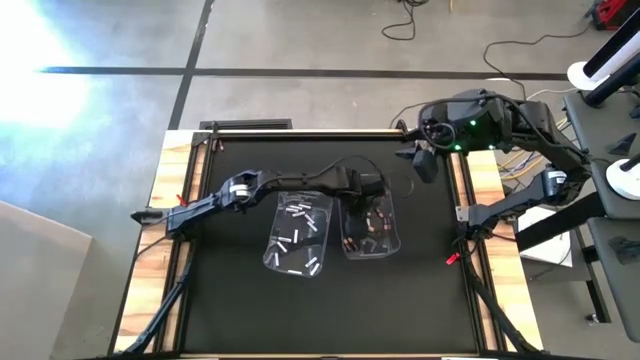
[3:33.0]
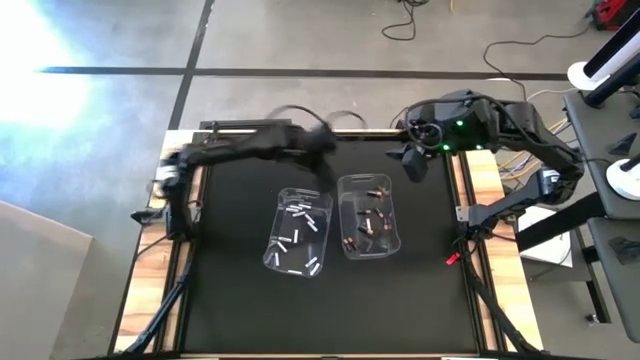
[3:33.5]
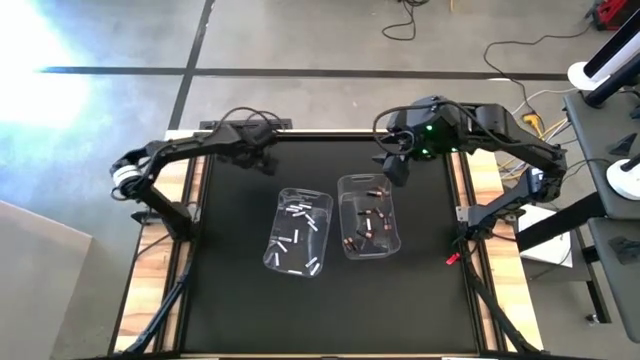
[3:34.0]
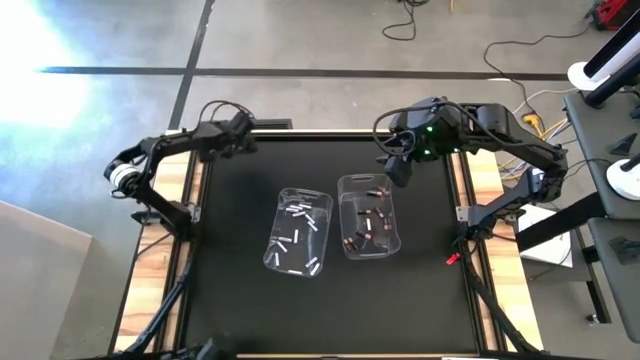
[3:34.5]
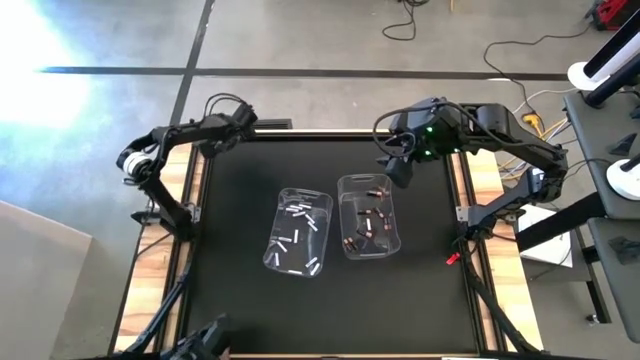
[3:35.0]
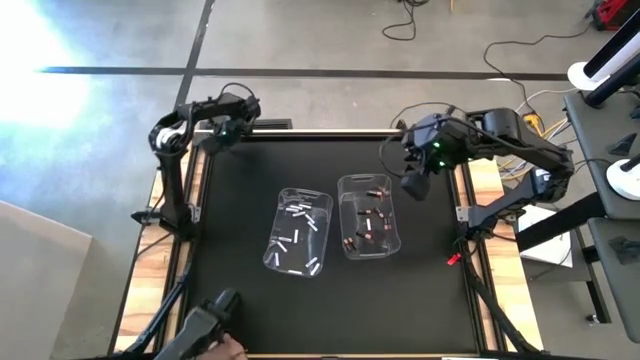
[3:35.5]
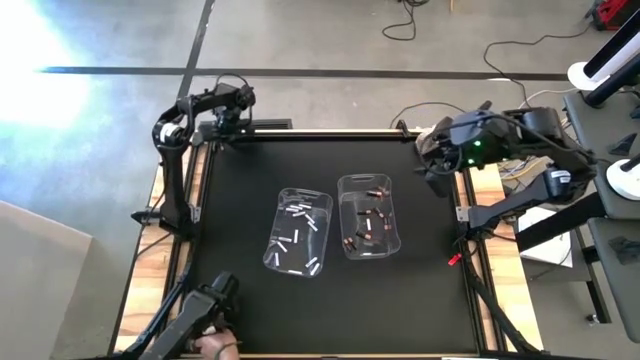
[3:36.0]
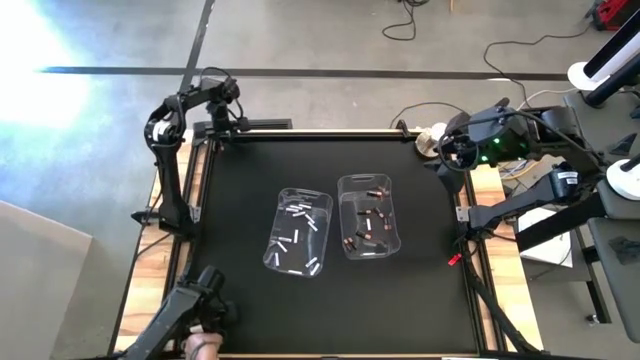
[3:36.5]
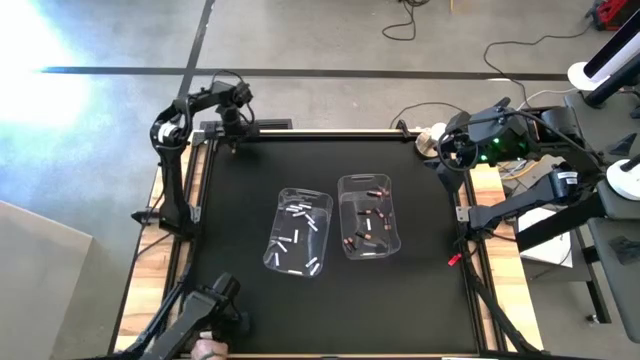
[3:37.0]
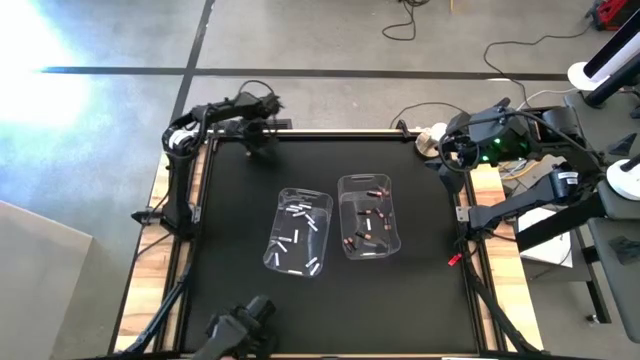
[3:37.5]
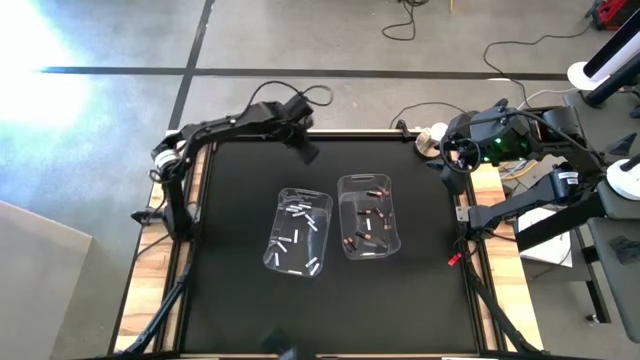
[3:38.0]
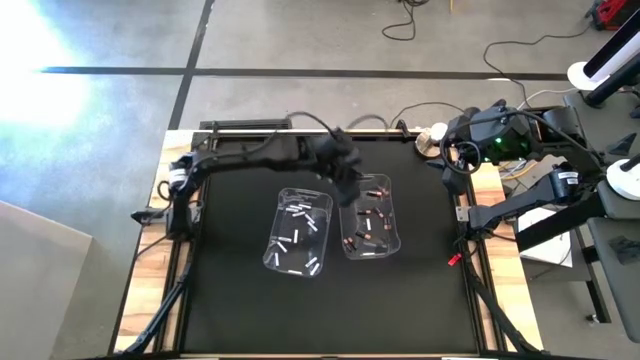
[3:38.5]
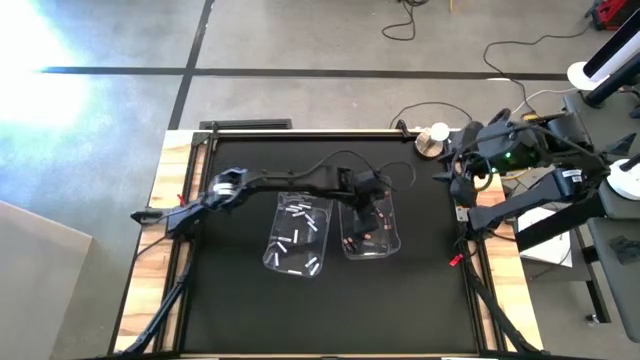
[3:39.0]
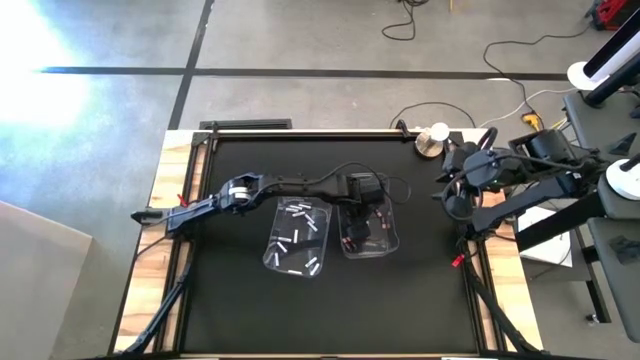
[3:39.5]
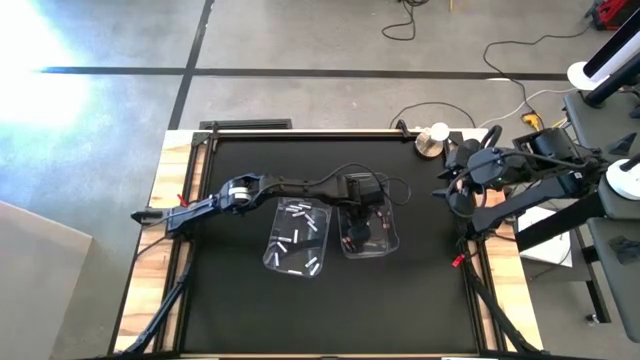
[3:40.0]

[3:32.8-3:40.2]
Task: Sort batteries
Put the black battery into the right transparent bin

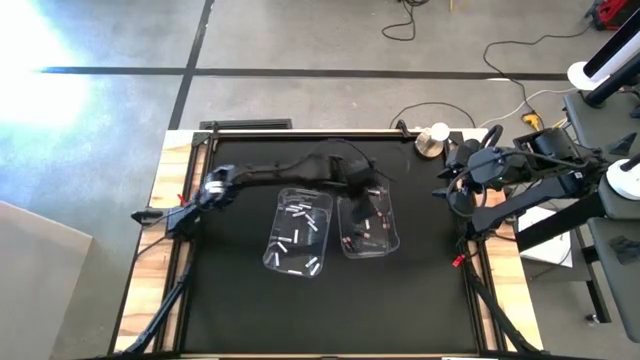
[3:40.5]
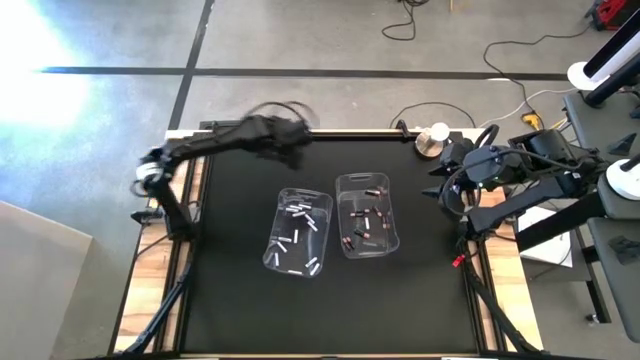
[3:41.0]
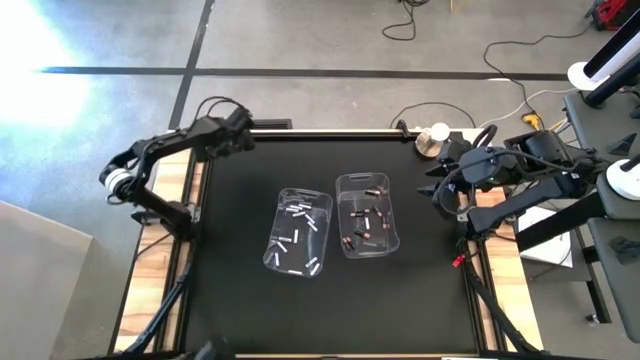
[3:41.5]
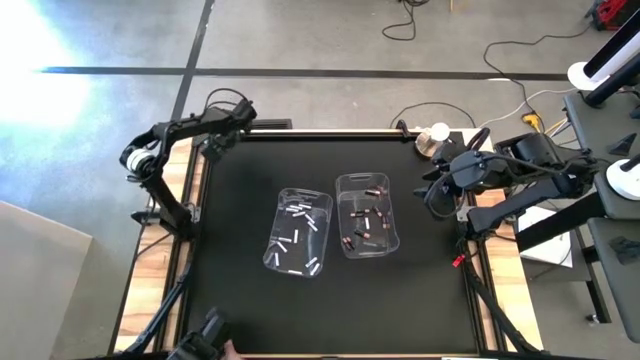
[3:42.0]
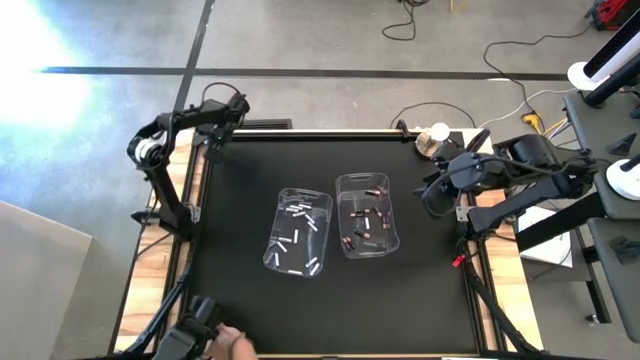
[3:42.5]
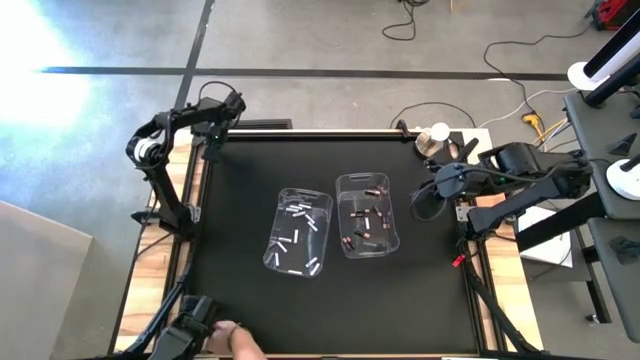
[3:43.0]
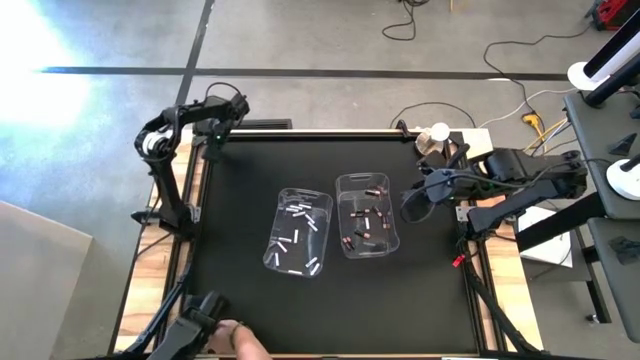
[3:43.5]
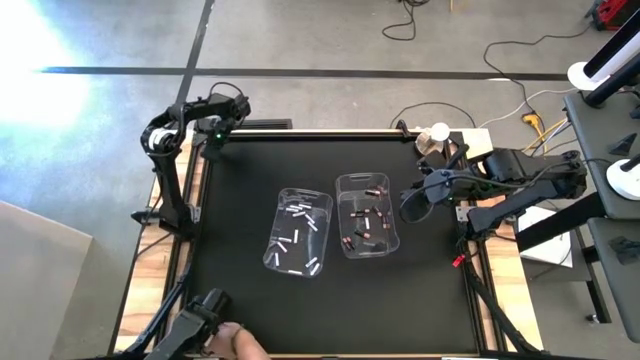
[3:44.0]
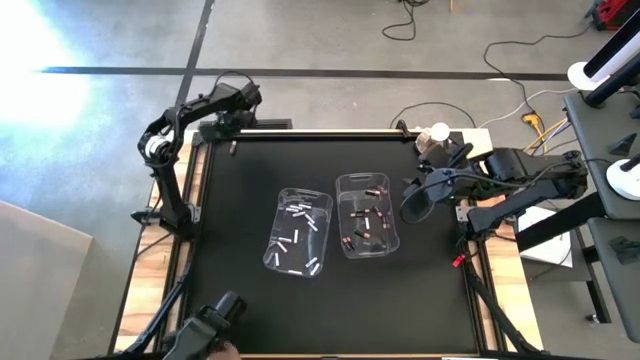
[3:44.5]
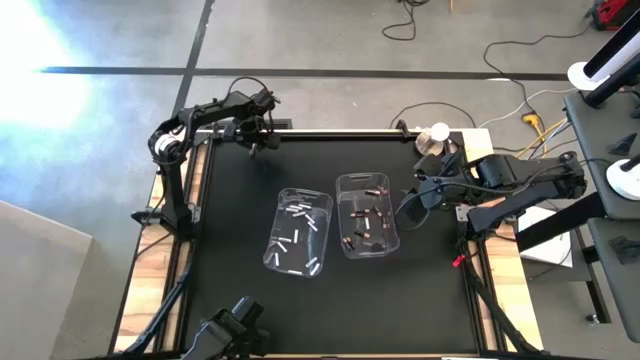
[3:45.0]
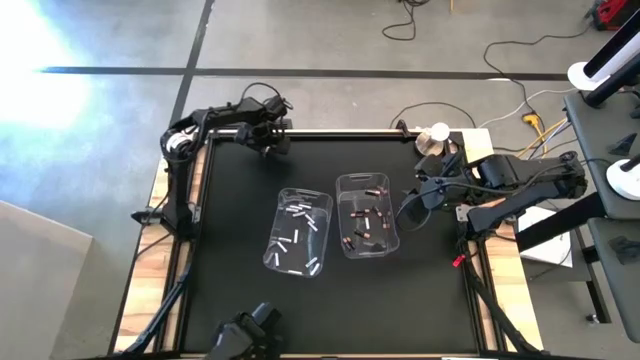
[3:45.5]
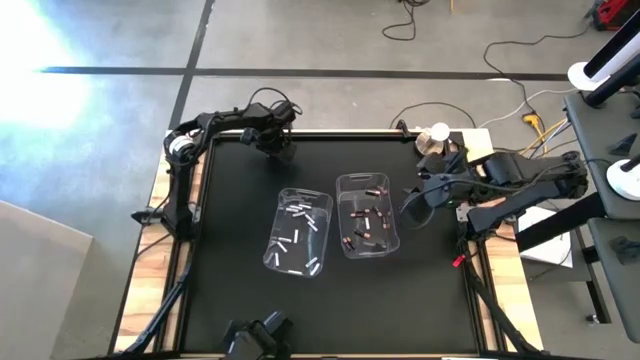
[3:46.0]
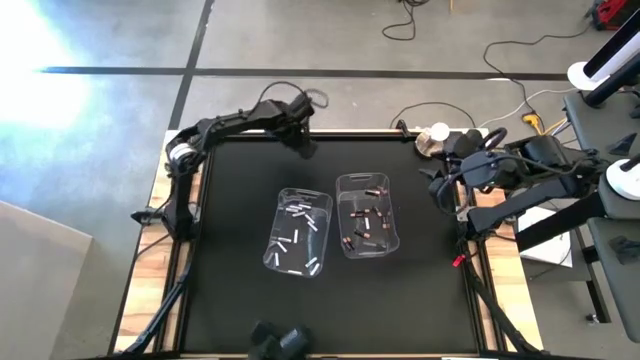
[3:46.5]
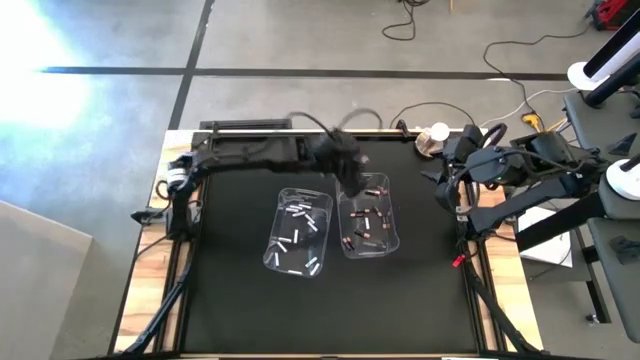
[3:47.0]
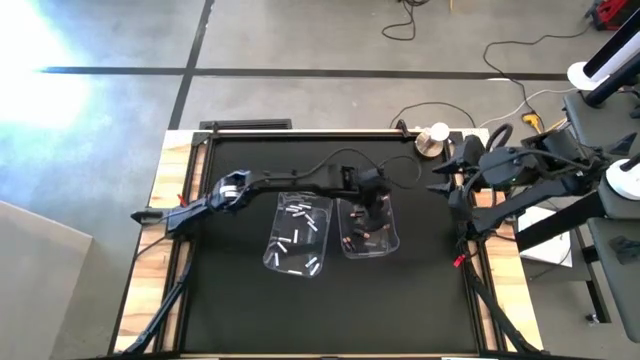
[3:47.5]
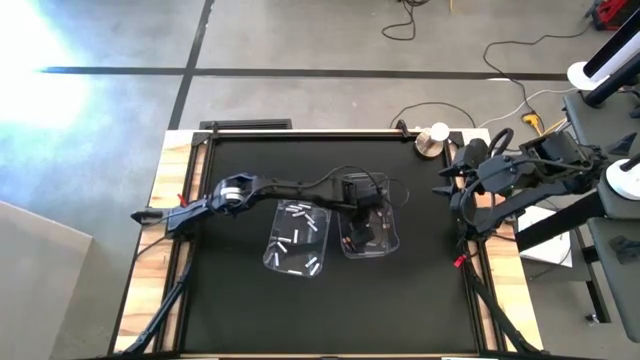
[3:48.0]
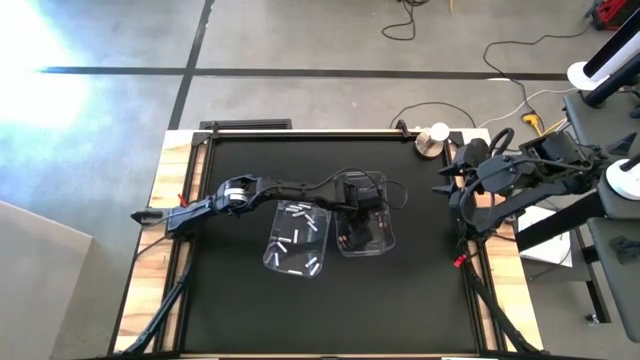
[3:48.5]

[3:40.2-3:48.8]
Put the black battery into the right transparent bin

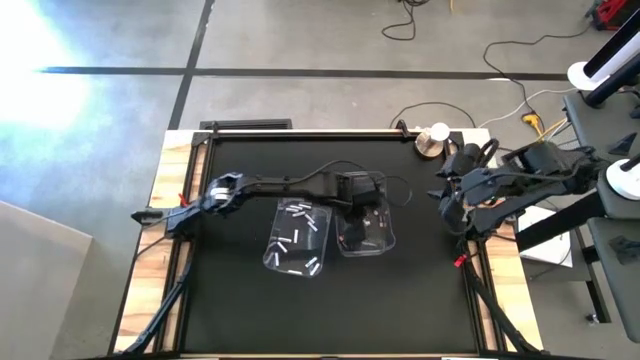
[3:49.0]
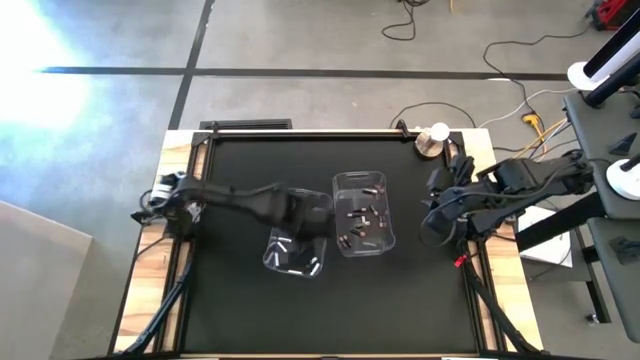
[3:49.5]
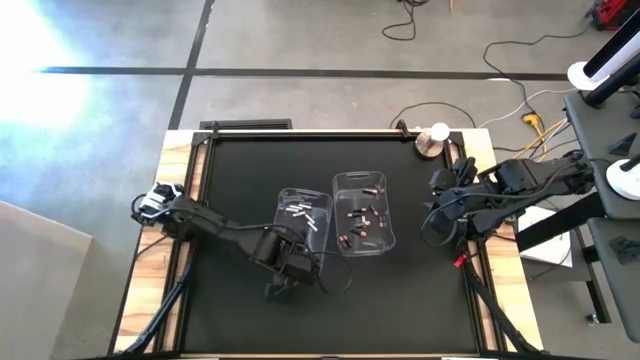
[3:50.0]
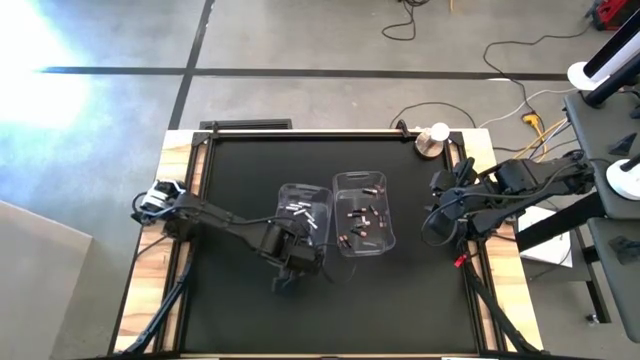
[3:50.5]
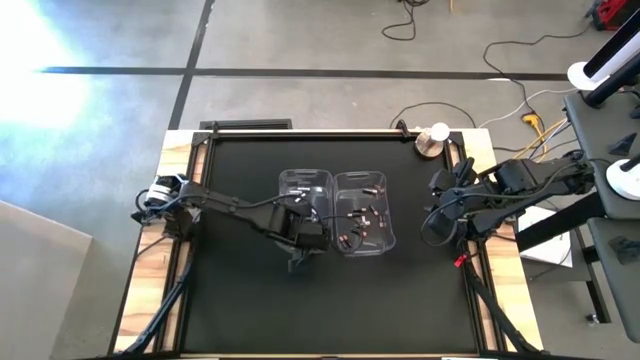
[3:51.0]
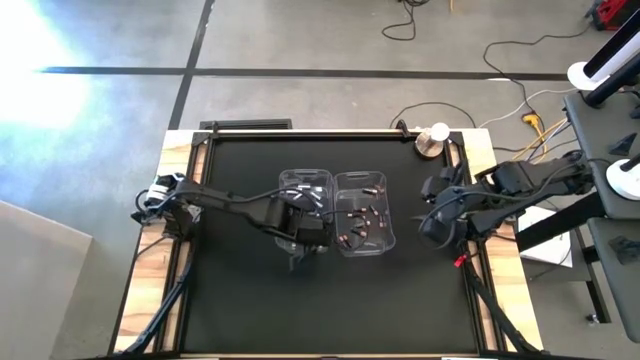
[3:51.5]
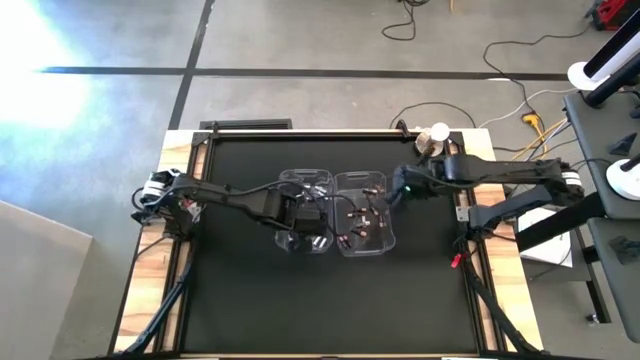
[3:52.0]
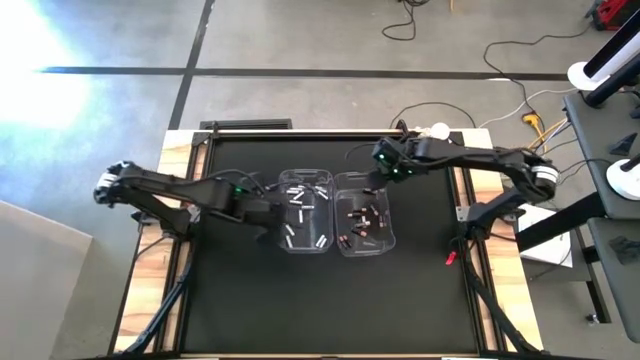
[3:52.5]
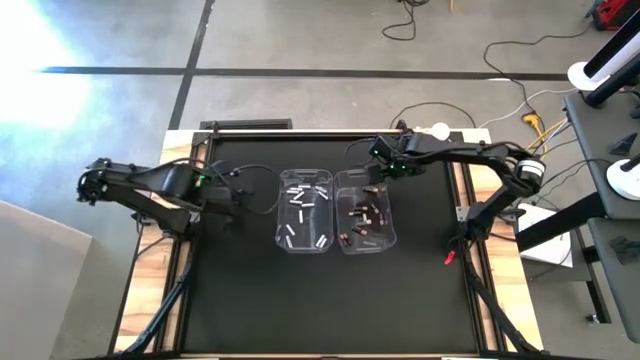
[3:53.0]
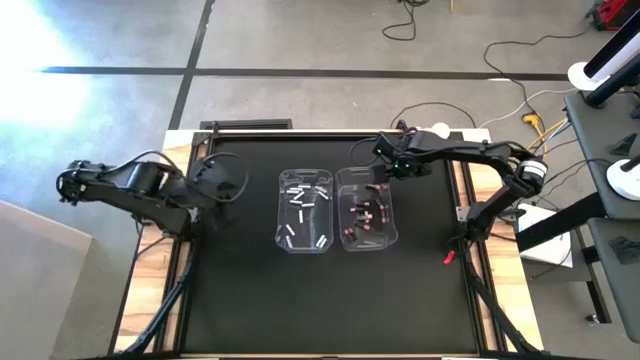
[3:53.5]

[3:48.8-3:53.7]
Adjust the transparent bins
